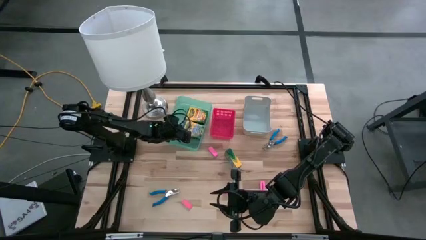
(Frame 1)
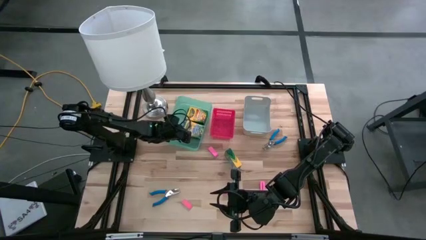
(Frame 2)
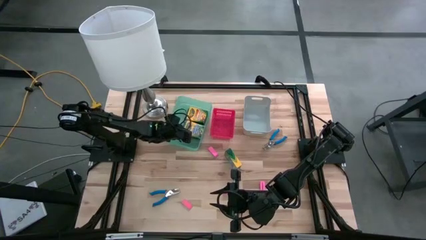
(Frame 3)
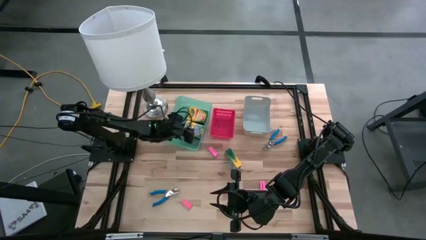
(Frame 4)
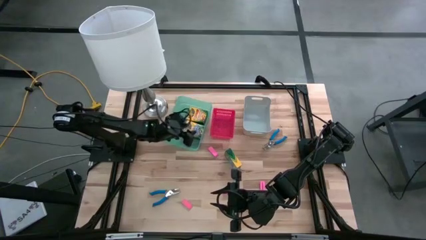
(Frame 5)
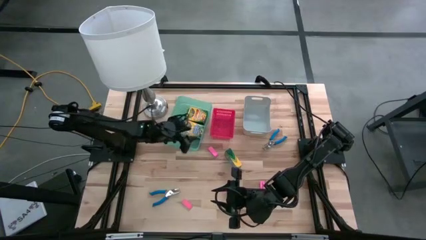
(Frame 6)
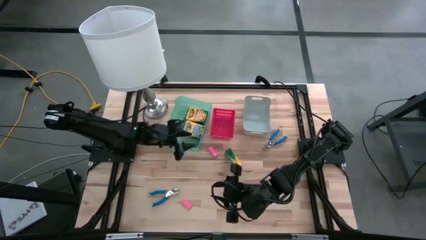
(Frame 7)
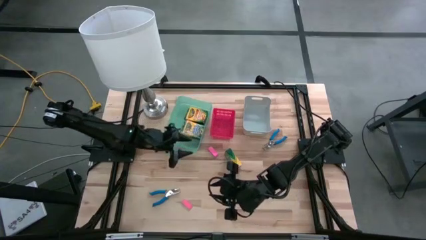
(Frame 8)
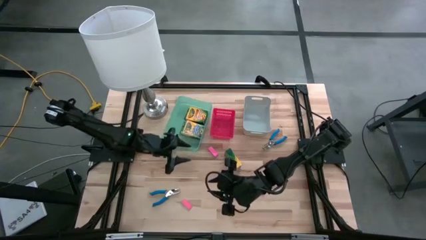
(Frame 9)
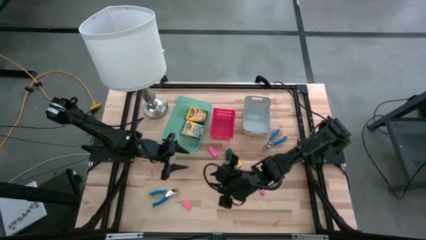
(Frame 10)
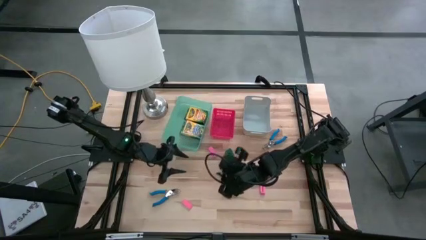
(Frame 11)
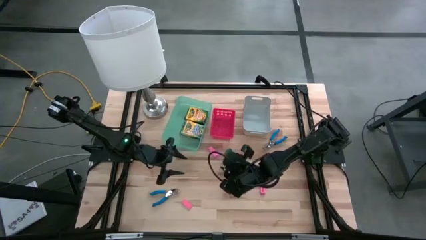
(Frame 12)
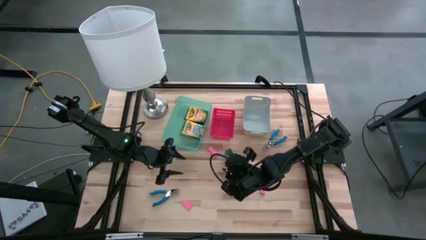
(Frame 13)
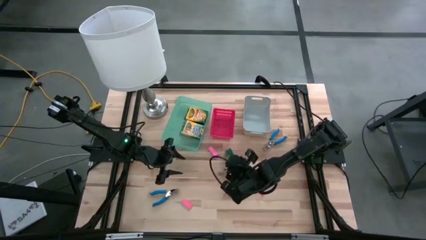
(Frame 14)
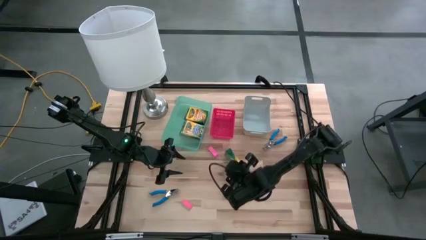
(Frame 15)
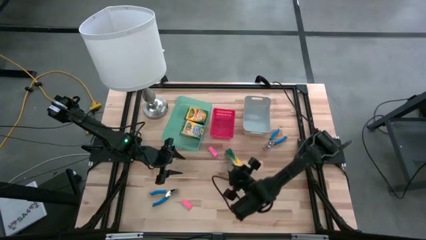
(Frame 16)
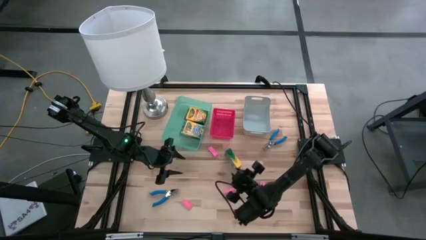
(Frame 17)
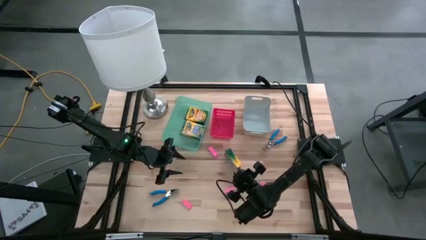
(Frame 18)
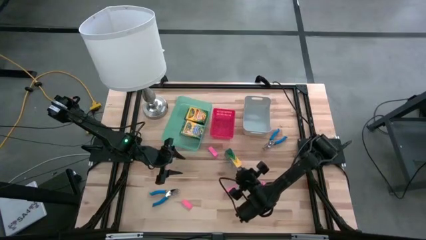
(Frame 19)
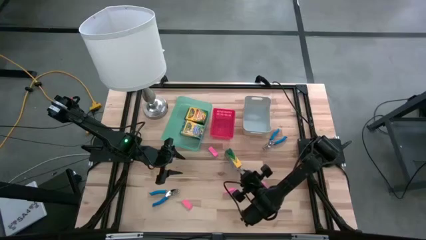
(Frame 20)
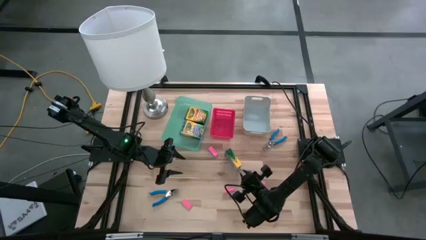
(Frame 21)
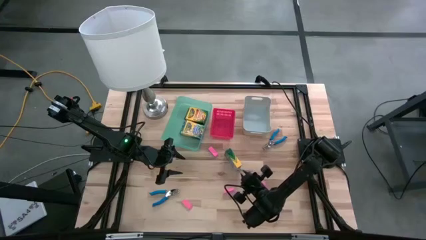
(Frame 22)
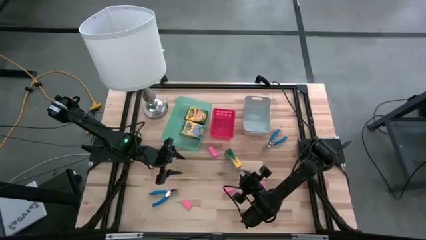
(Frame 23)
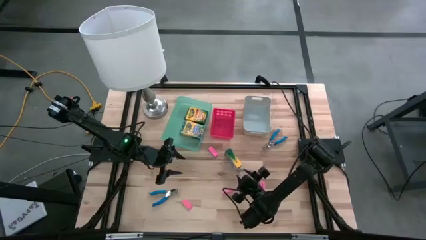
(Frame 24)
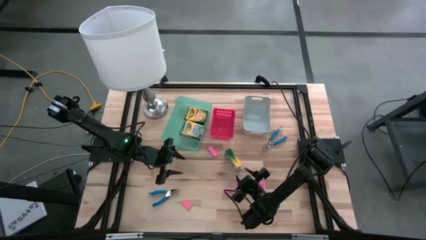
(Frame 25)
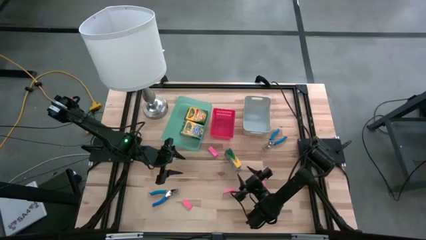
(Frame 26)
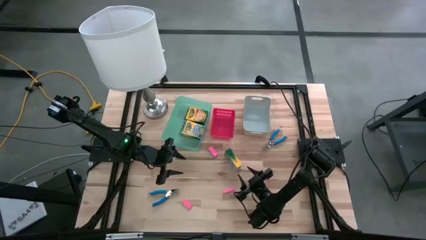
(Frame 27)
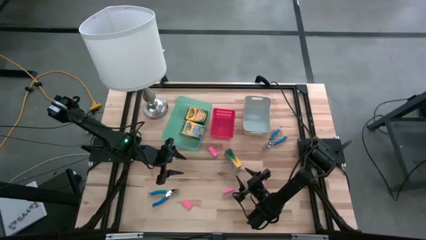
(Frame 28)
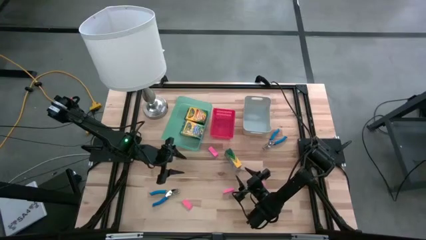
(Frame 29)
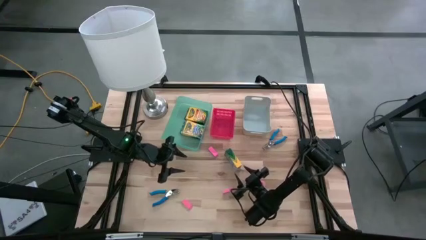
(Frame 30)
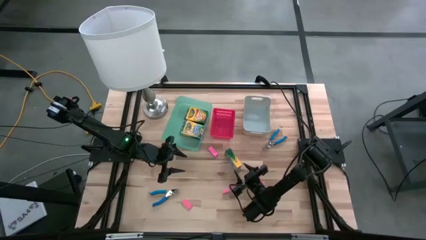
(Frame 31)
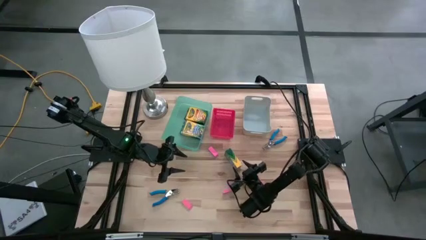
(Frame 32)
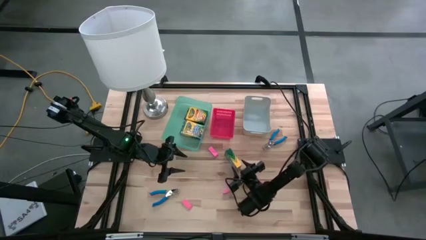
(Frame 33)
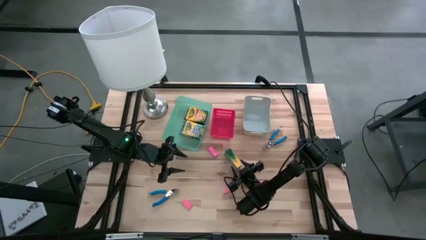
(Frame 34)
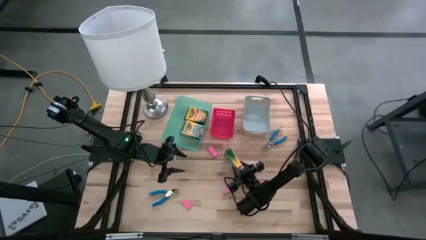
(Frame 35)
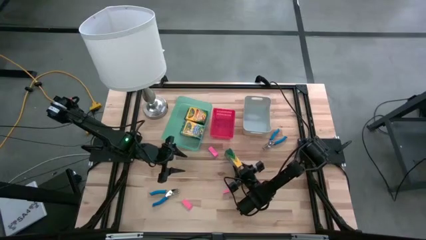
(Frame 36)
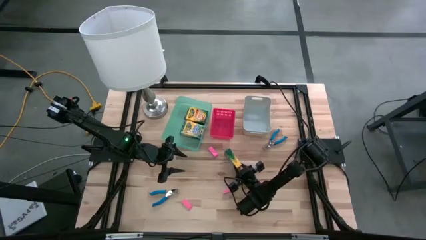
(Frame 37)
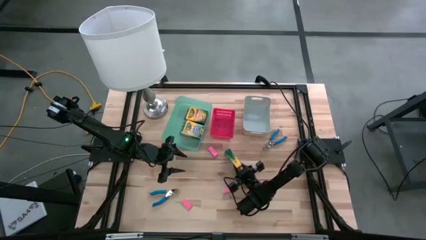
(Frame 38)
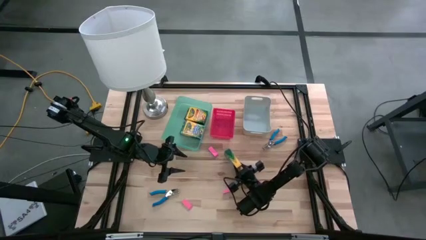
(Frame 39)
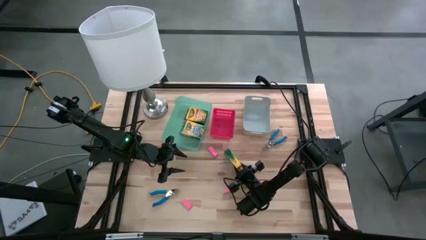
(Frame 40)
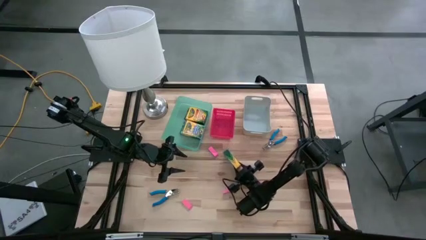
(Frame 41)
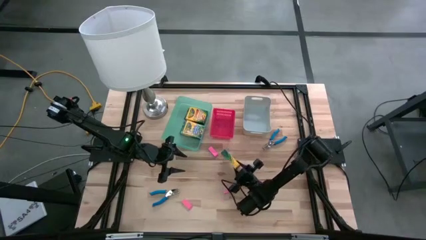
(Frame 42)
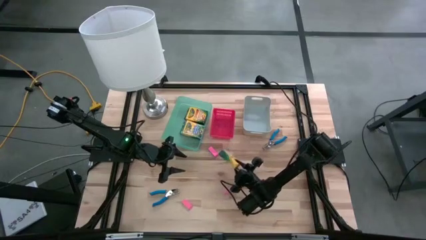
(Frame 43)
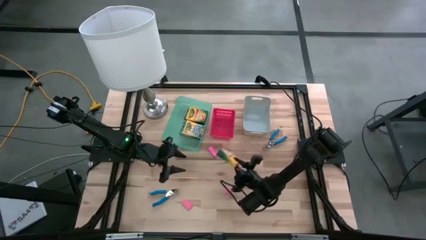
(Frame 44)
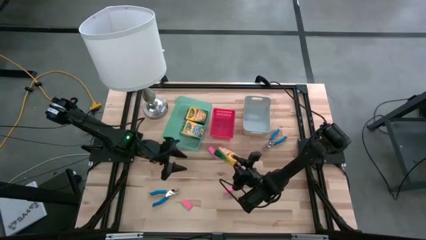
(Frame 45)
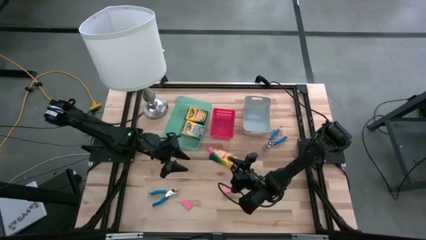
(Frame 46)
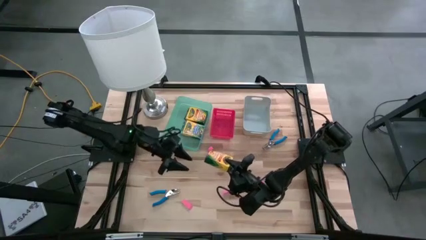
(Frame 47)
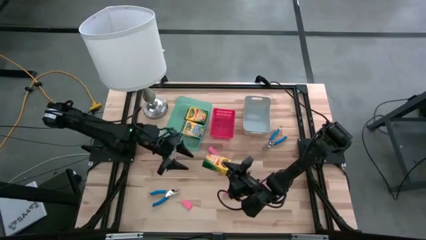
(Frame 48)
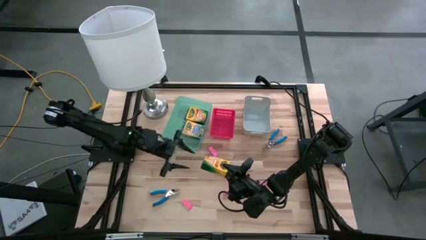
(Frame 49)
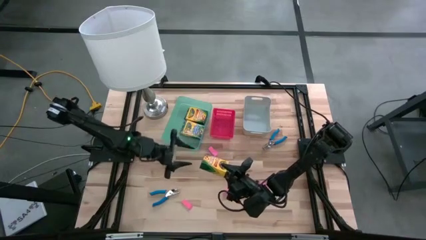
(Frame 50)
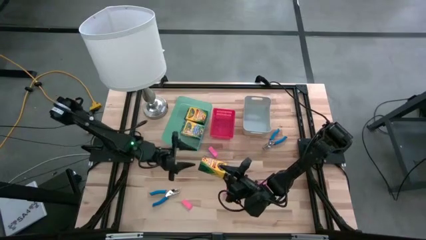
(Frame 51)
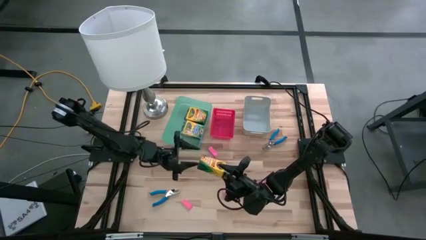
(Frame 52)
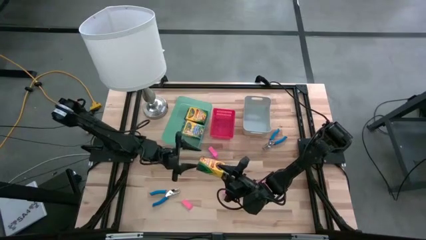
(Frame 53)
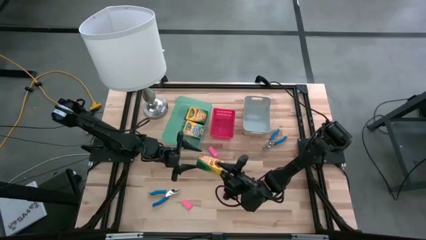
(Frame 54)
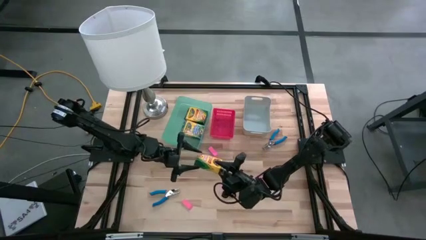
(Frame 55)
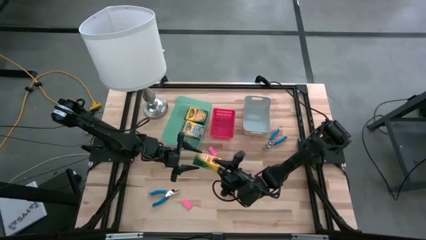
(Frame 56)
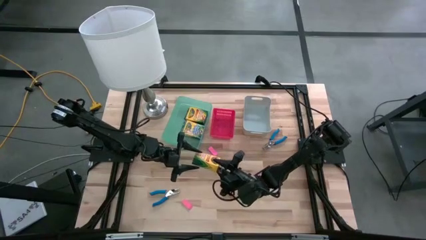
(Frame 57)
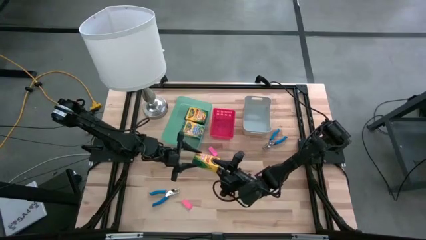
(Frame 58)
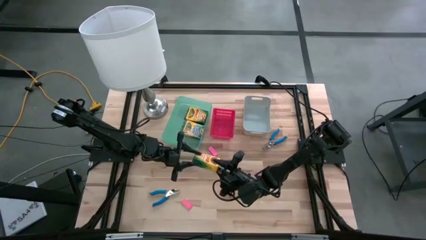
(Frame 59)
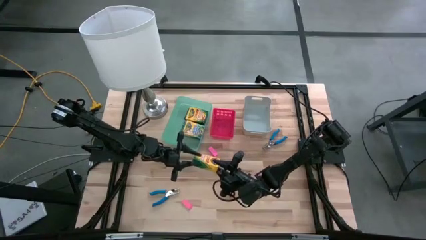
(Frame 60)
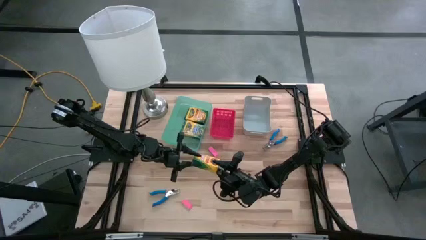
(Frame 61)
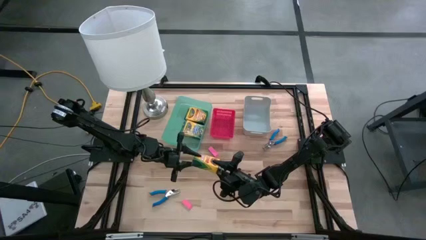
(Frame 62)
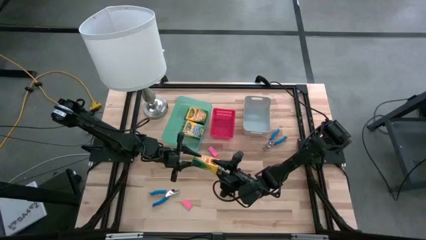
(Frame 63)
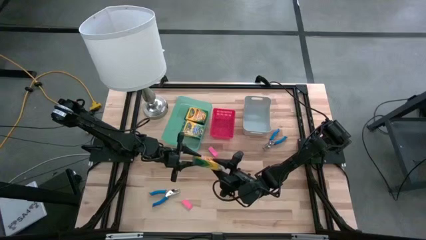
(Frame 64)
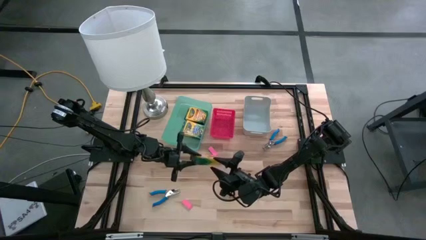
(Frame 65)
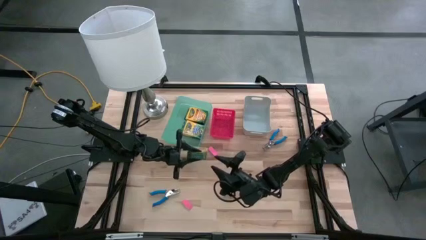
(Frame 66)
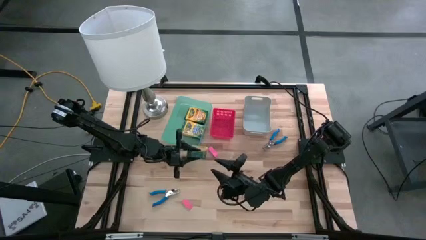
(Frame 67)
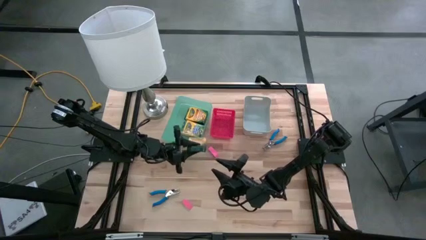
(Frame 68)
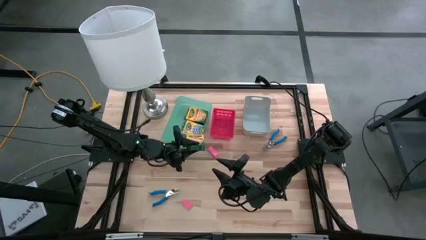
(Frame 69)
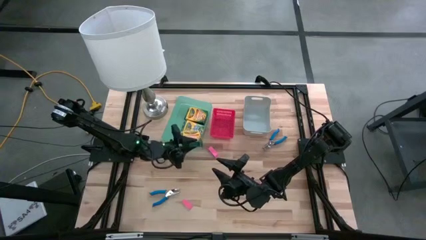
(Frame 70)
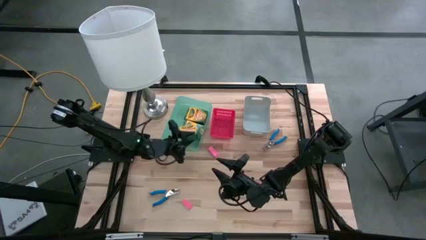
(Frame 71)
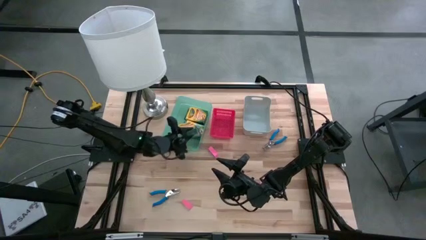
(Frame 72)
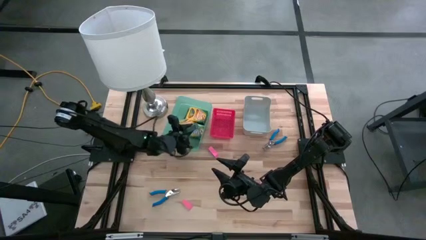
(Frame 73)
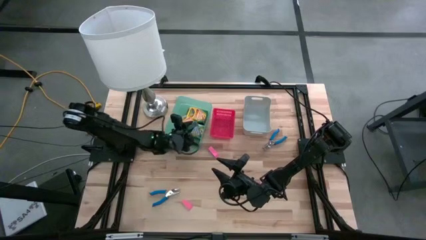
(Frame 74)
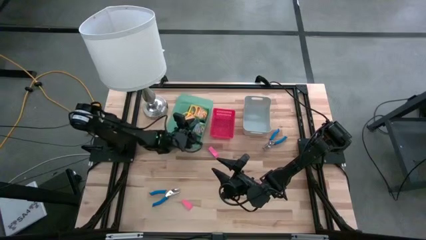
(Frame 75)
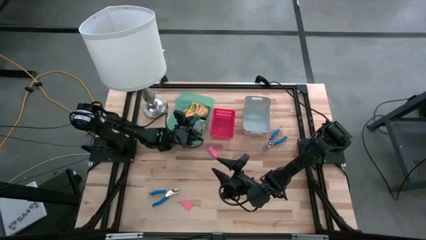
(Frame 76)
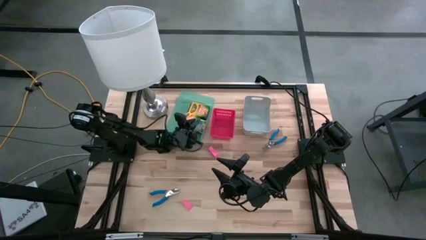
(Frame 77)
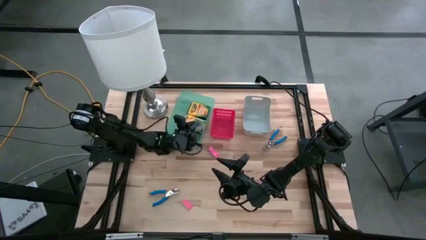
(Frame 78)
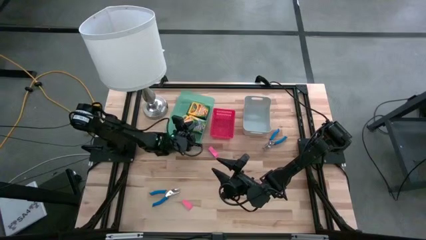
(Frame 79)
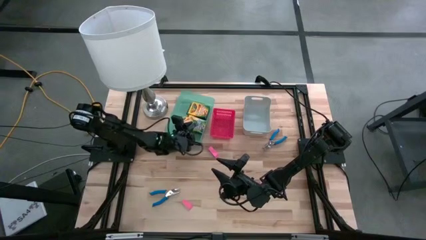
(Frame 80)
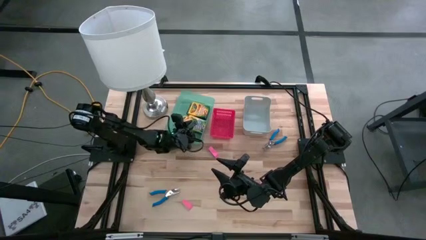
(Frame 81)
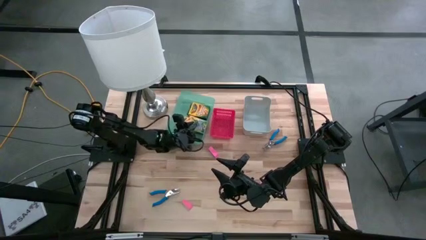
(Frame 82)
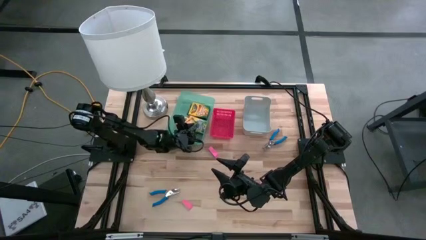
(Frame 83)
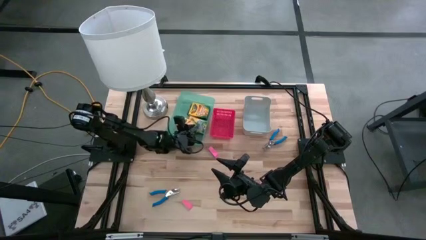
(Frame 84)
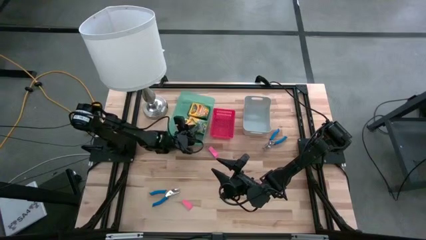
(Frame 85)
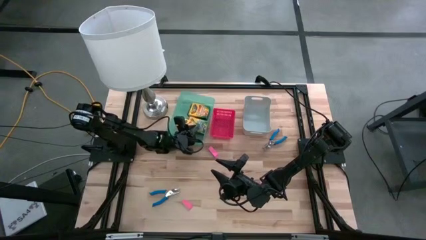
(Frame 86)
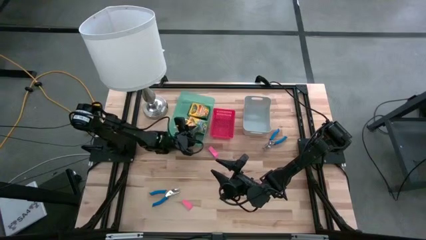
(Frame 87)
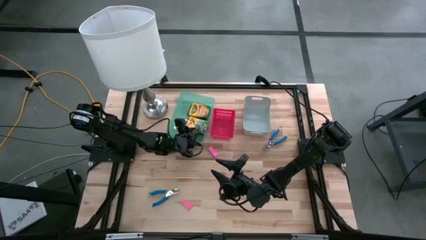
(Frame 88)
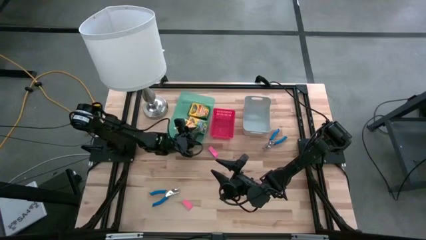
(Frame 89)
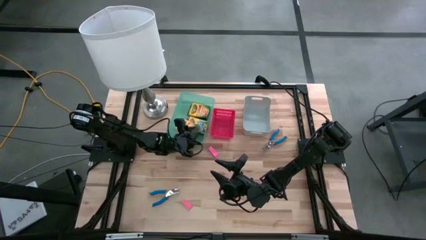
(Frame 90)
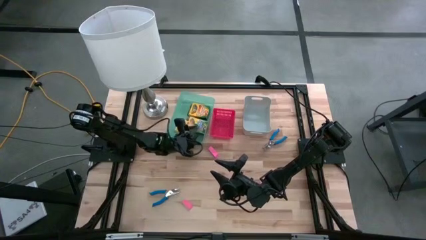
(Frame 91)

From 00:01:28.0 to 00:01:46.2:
Task: Pick & Place School Supplies
Put the yellow crayon box into the green bin
